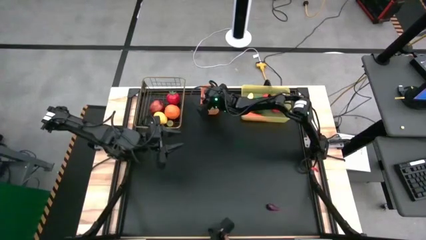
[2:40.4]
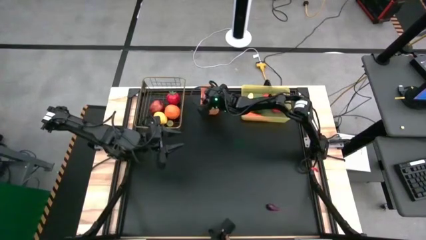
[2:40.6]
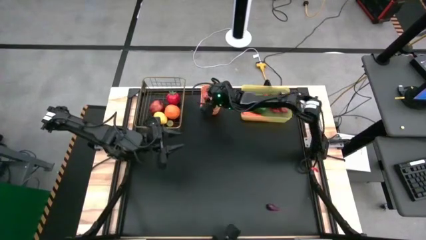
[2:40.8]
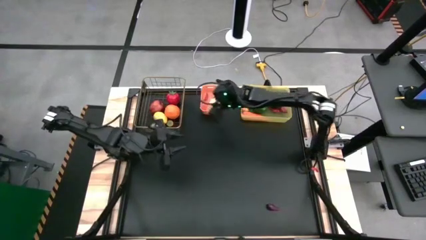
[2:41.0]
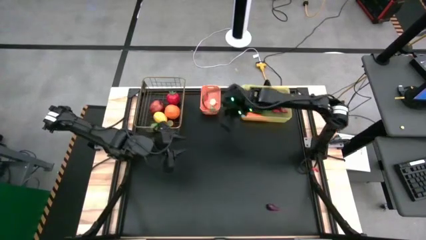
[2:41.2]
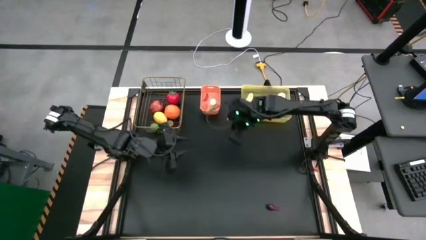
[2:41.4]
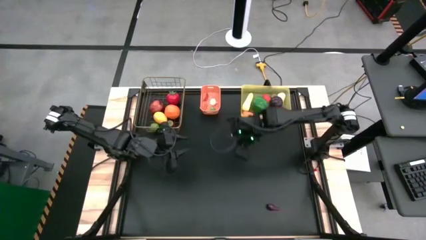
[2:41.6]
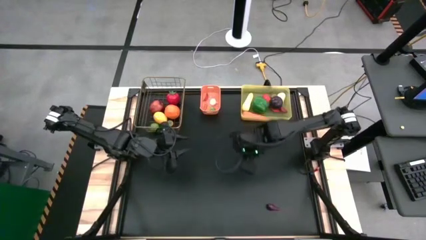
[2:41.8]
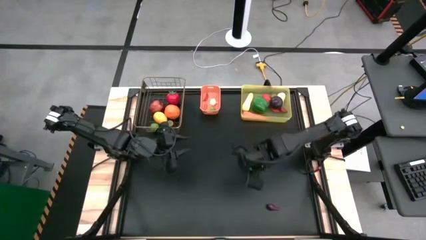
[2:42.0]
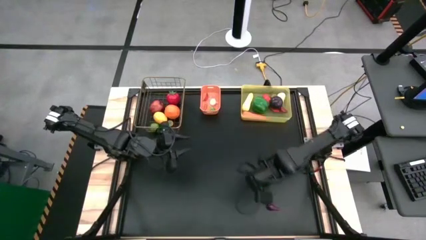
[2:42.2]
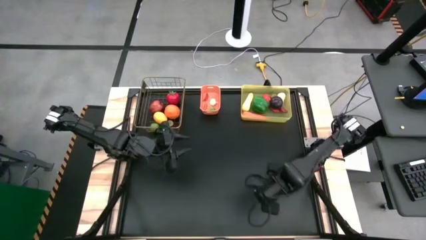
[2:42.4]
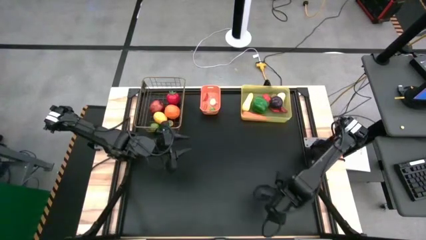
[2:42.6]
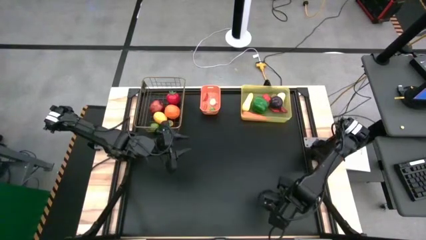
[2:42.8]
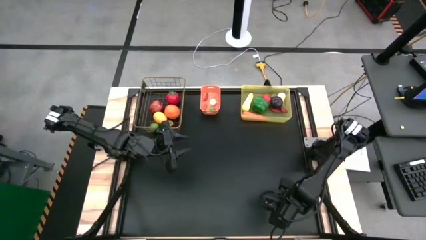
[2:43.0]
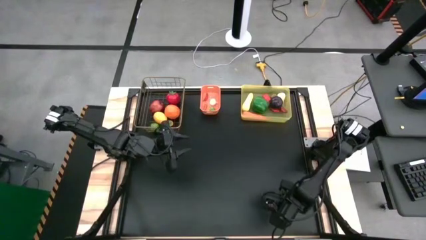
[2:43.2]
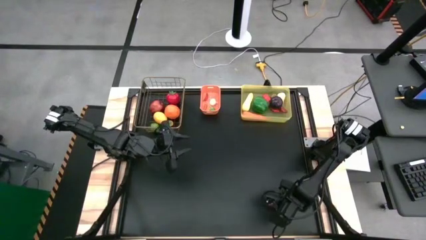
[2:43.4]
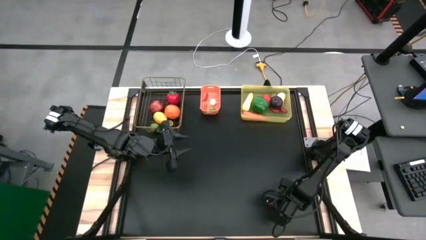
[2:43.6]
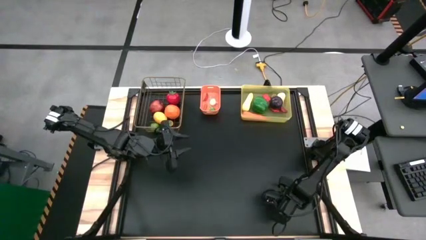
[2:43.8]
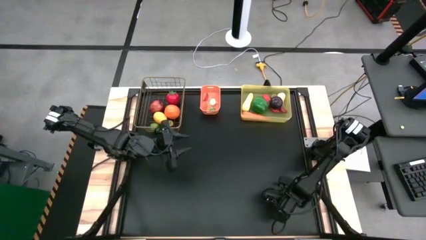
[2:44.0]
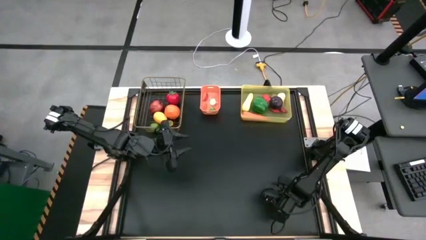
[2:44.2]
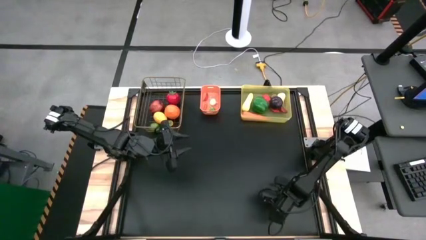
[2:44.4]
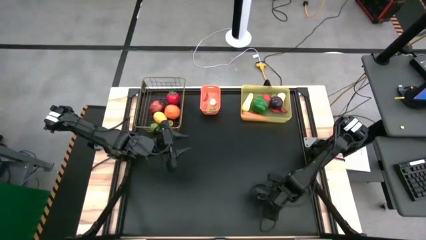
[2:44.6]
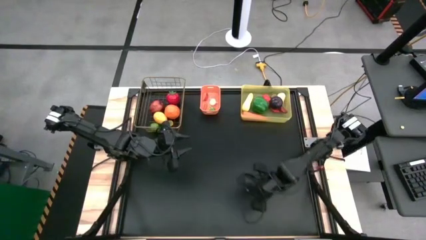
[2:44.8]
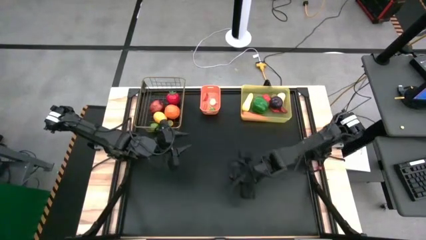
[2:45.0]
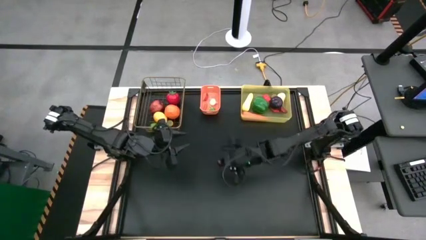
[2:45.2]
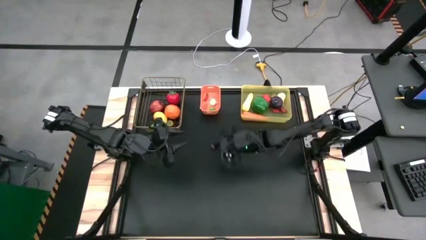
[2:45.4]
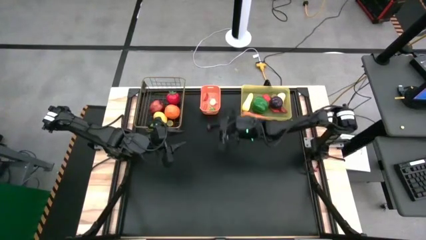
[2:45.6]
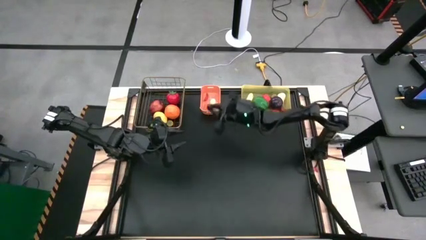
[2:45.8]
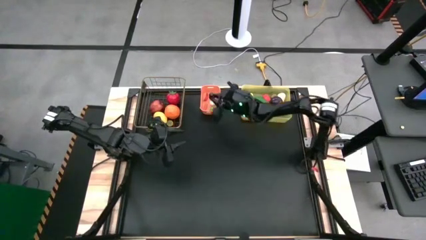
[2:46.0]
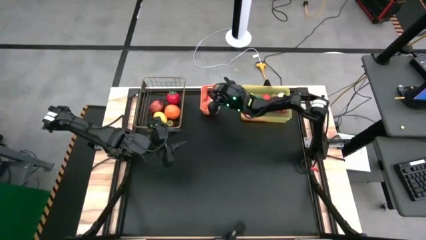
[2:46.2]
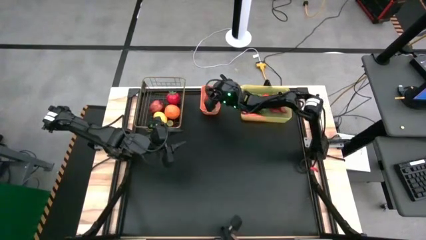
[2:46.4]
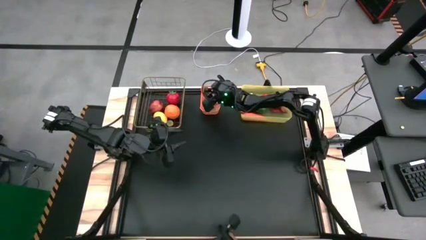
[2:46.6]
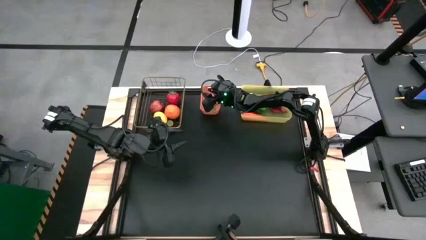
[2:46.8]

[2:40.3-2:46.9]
Task: Sort produce into baskets
Put the purple eggplant into the orange bin

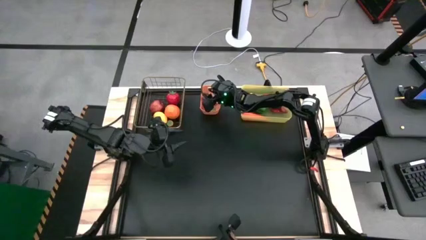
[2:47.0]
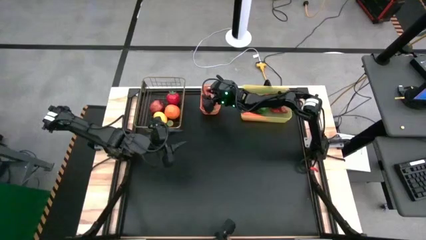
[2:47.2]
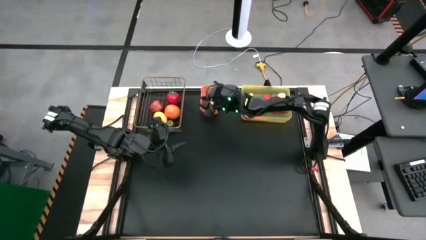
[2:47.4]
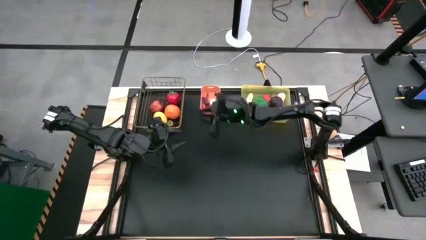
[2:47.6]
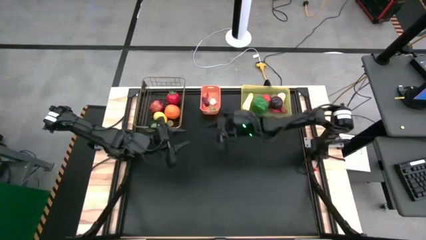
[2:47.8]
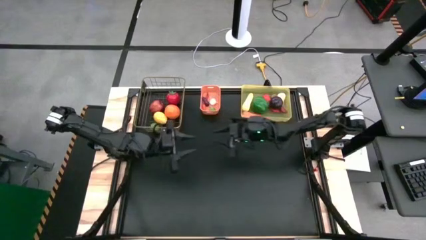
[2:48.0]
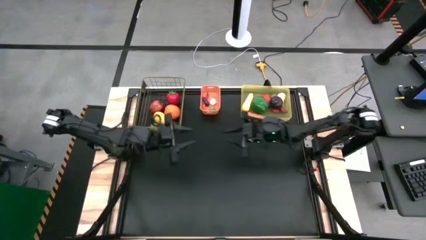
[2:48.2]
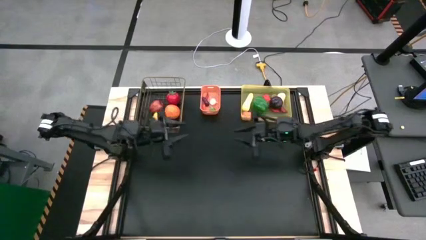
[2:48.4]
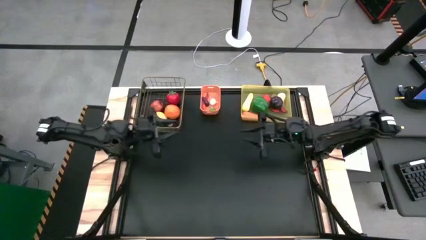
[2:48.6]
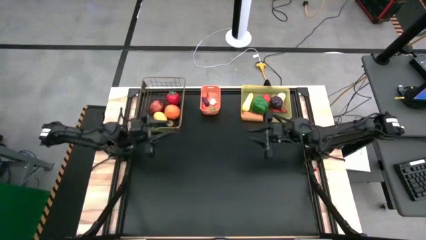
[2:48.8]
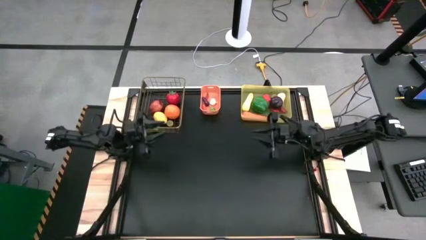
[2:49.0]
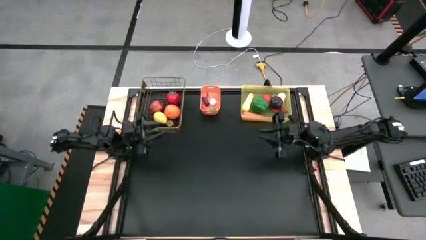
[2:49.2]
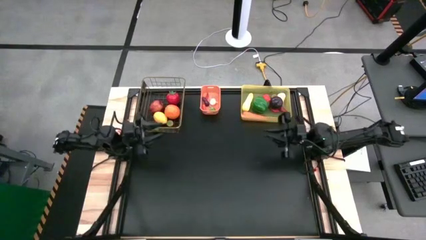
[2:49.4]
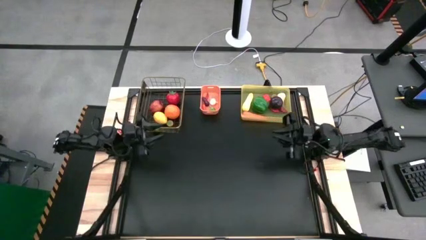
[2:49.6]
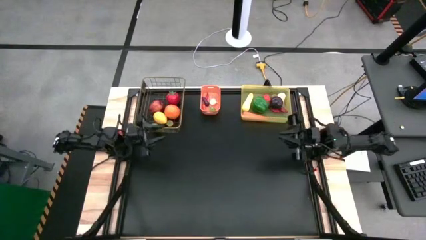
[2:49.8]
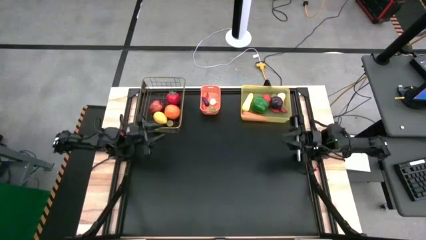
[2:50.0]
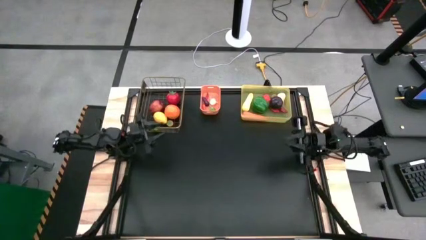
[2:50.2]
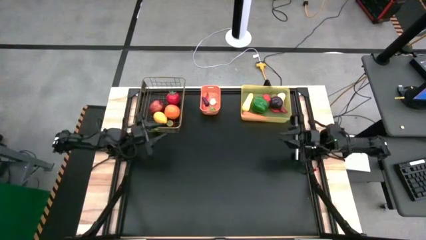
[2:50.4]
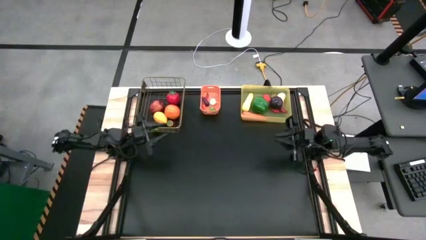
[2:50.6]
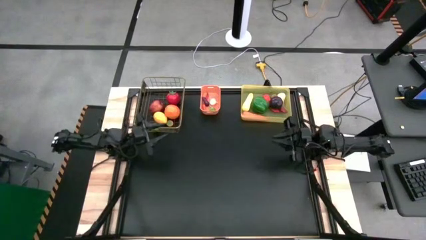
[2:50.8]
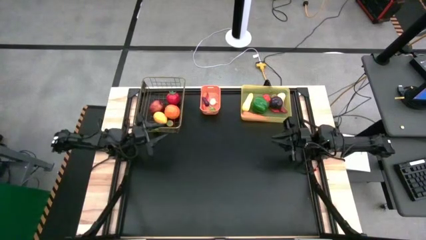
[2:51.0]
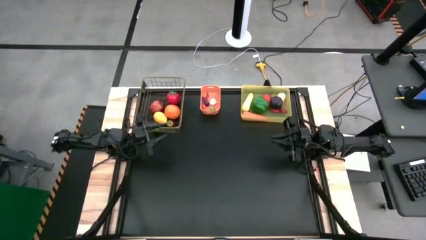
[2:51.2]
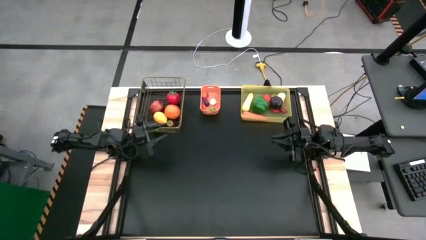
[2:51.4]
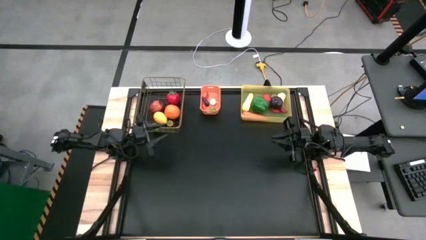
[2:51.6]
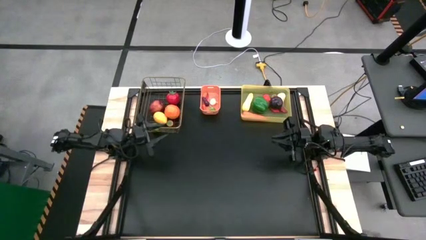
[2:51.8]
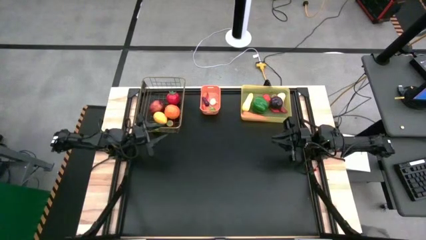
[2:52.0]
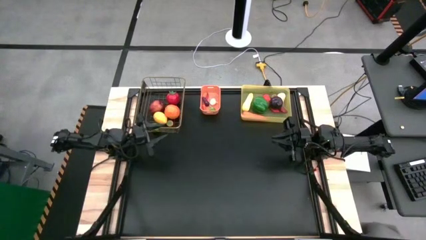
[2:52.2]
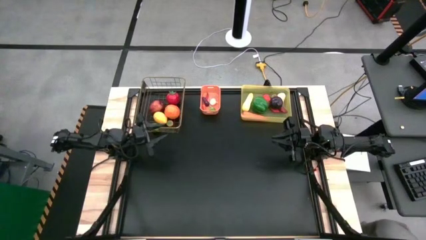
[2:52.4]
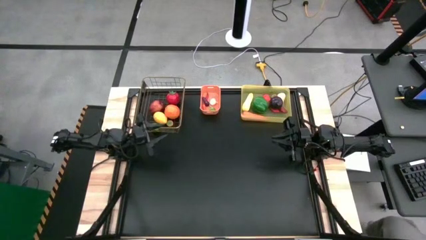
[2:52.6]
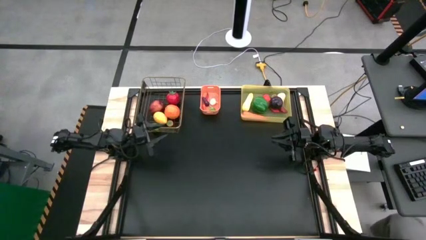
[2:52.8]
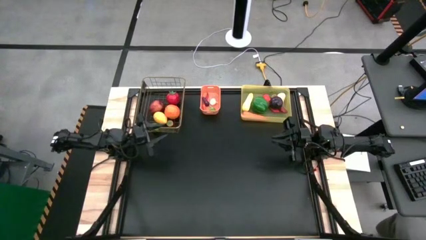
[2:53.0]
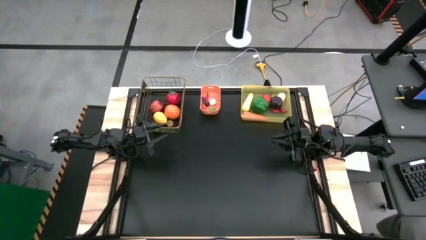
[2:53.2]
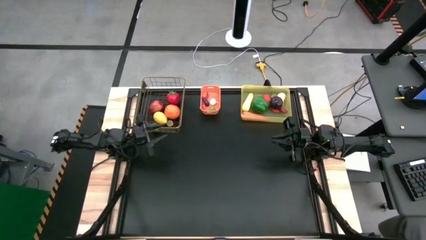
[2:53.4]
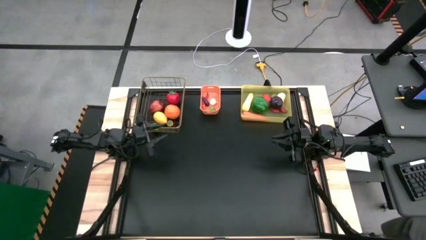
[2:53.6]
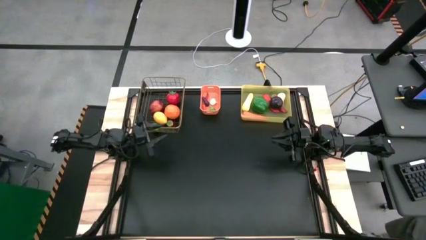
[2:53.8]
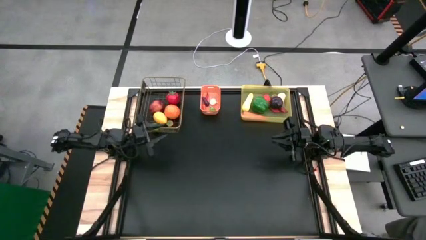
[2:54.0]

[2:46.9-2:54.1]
Return to Home Position

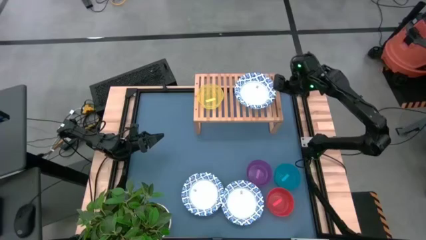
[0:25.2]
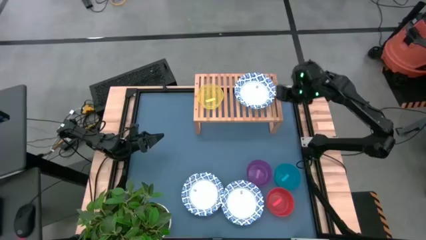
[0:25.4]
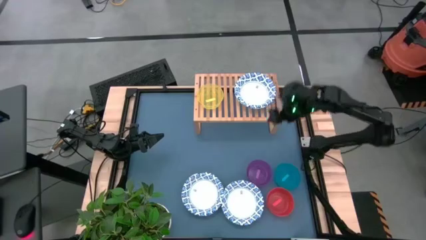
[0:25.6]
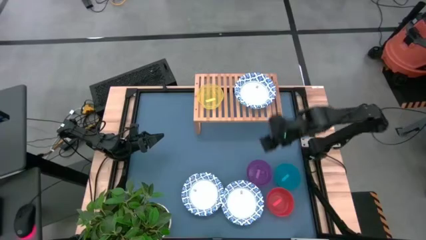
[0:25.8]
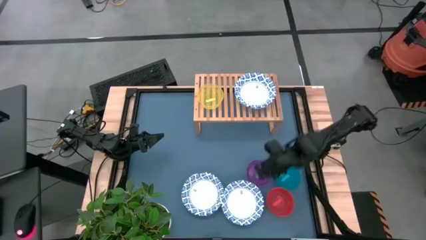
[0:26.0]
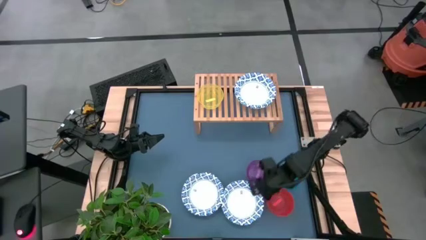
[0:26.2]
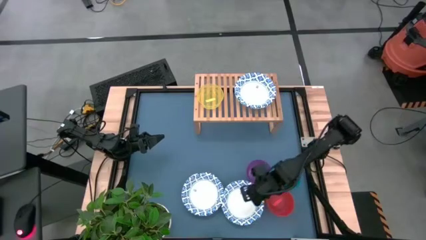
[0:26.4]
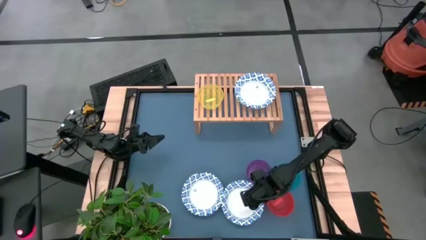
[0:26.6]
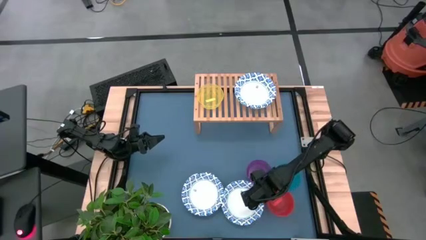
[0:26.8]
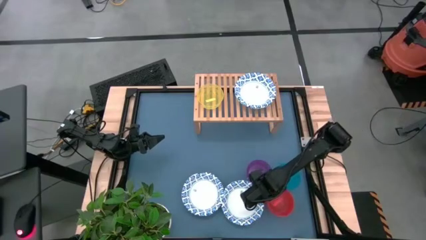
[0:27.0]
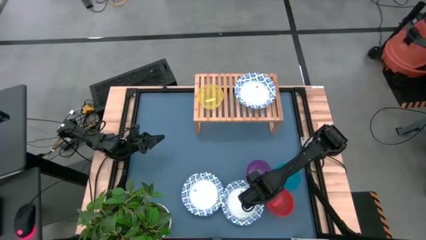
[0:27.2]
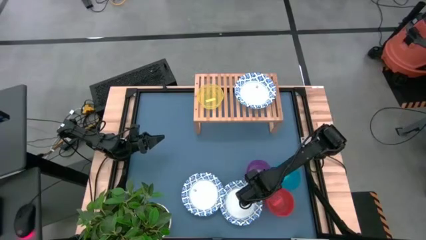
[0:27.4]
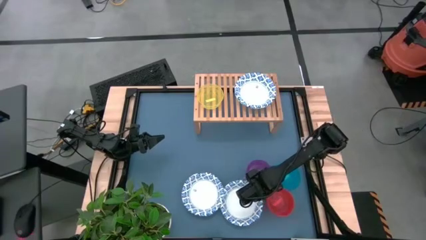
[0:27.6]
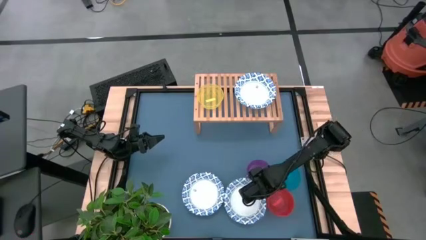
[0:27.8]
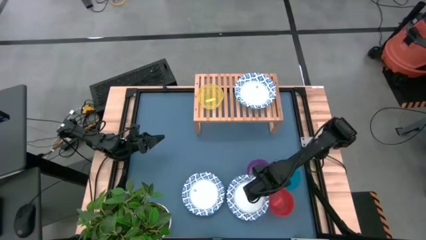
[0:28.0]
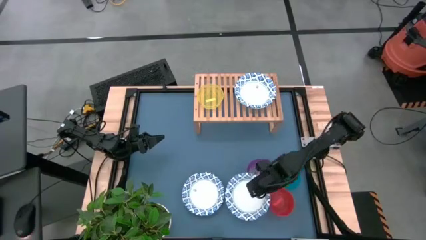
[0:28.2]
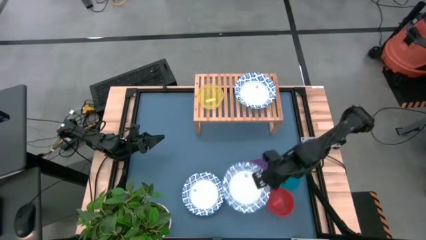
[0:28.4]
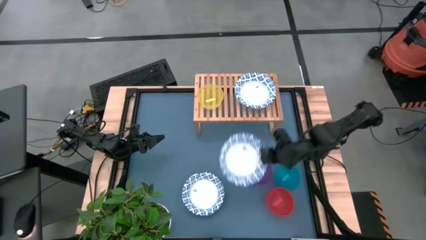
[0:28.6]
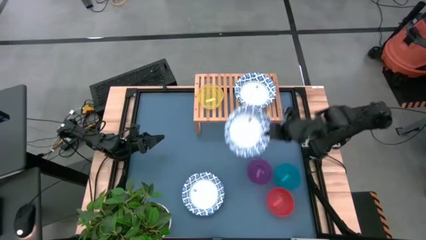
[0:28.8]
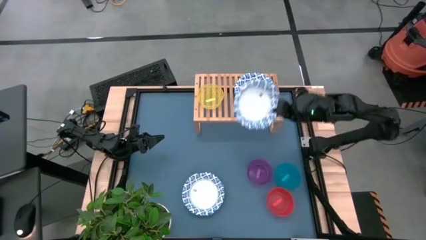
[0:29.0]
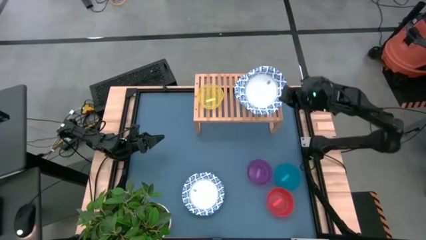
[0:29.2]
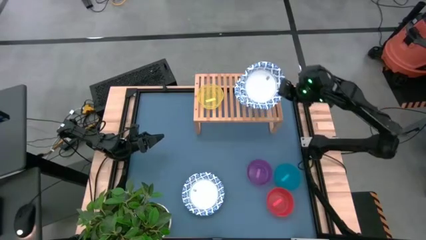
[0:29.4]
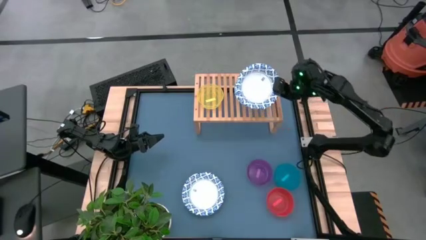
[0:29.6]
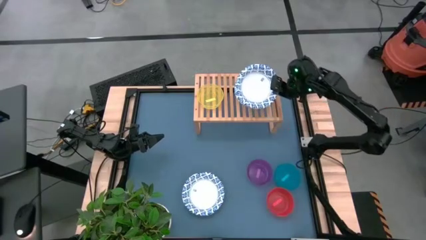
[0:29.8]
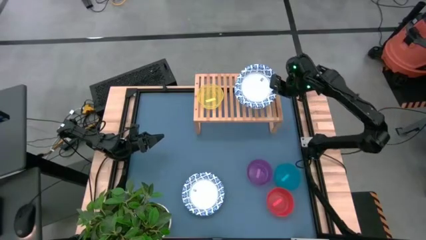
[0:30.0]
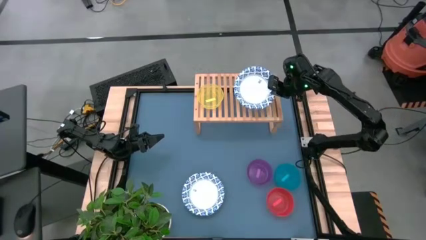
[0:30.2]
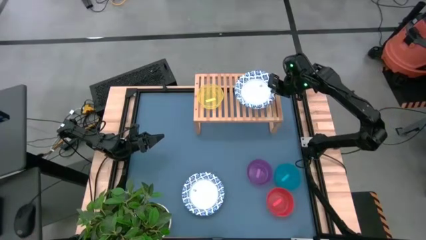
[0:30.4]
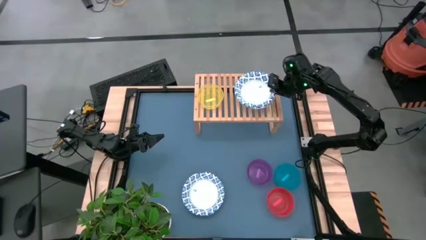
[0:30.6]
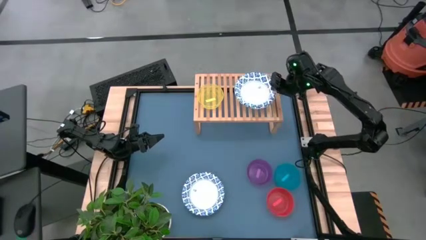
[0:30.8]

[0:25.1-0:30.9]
Task: Place and stack bowls onto a shelf
Stack the right white bowl on top of the white bowl on the shelf
